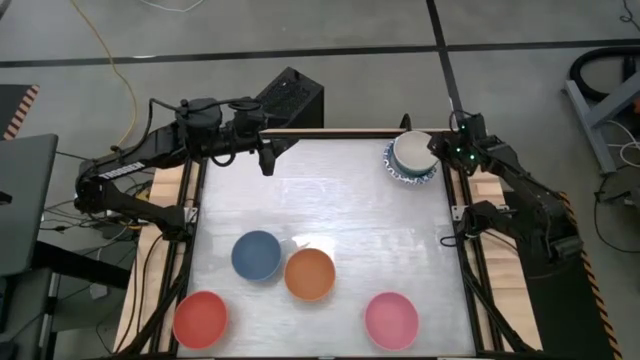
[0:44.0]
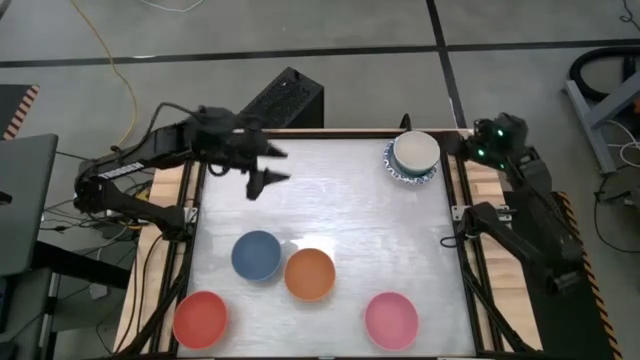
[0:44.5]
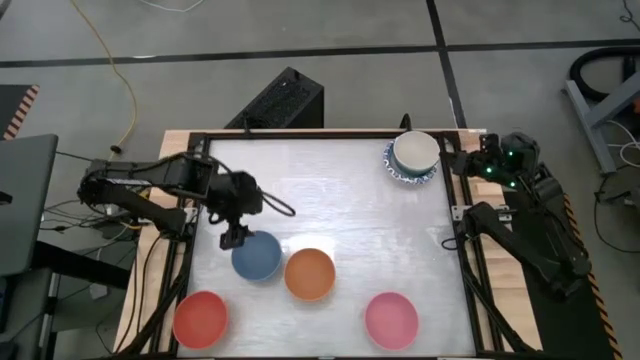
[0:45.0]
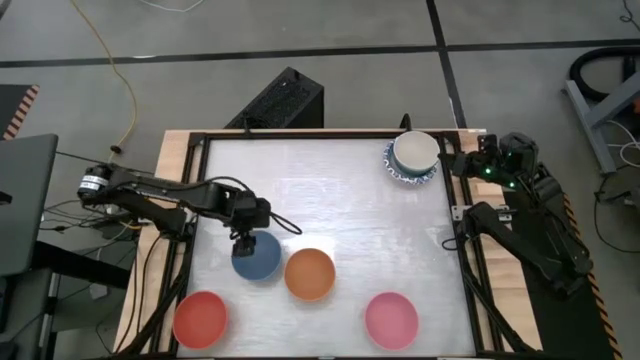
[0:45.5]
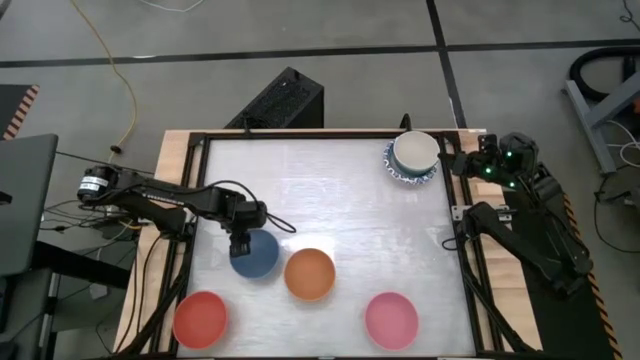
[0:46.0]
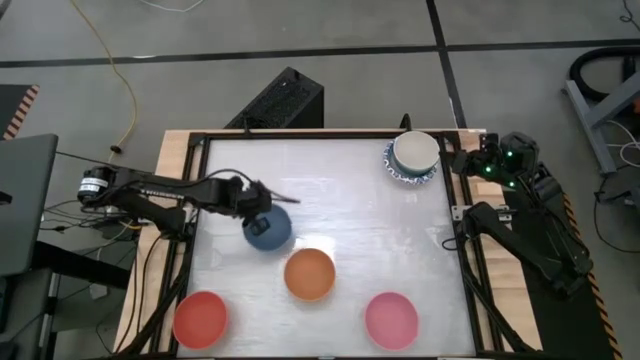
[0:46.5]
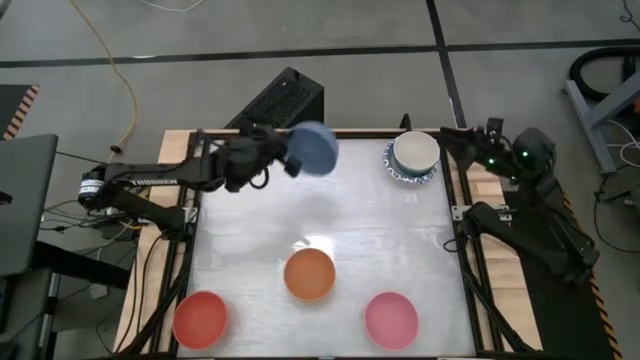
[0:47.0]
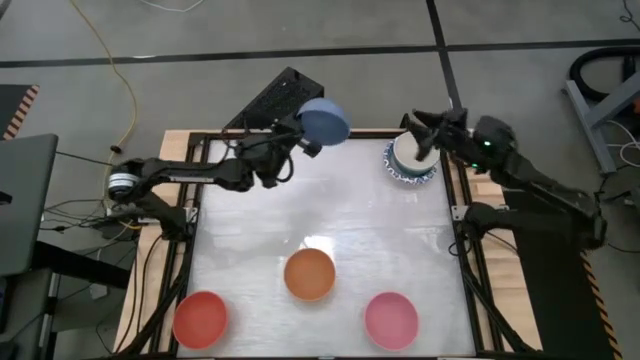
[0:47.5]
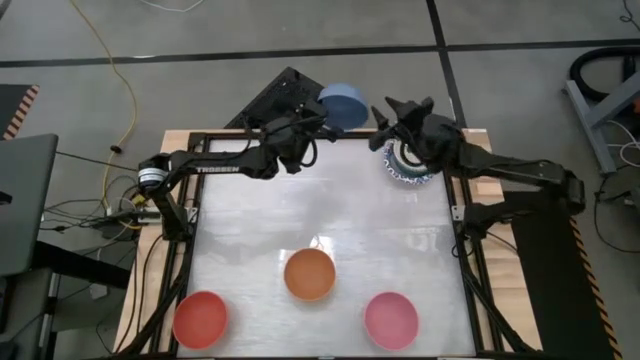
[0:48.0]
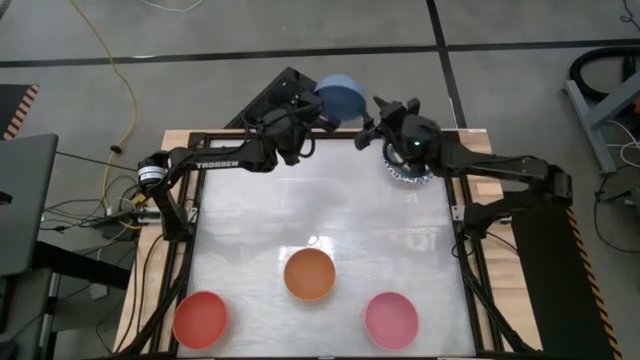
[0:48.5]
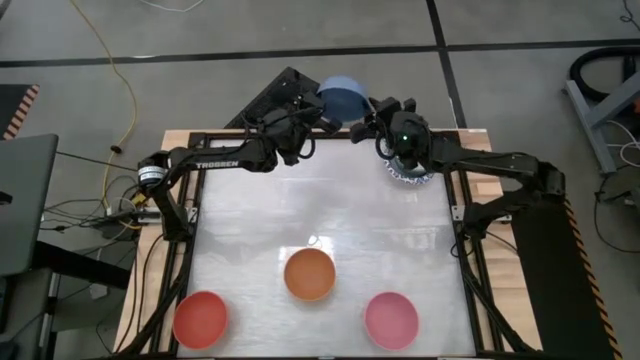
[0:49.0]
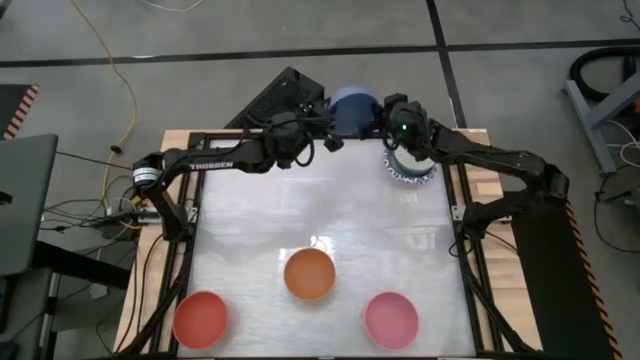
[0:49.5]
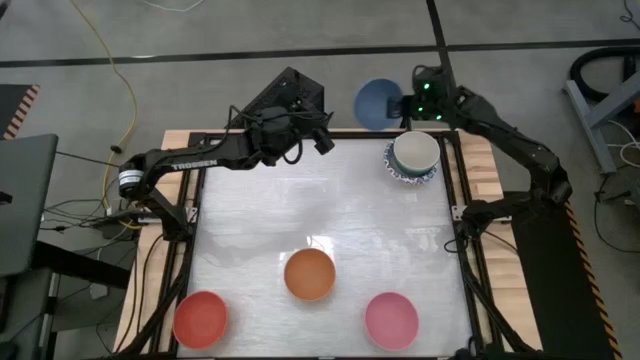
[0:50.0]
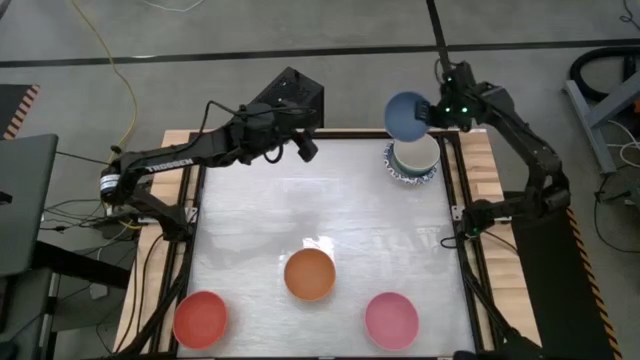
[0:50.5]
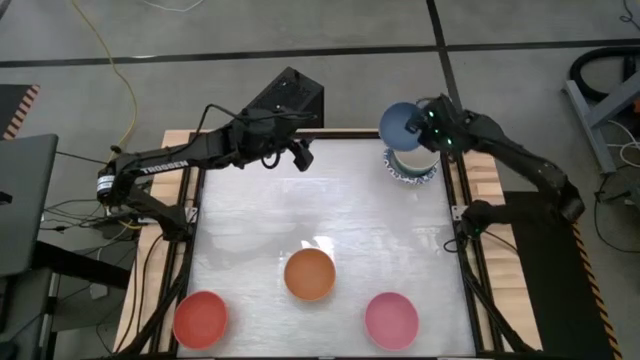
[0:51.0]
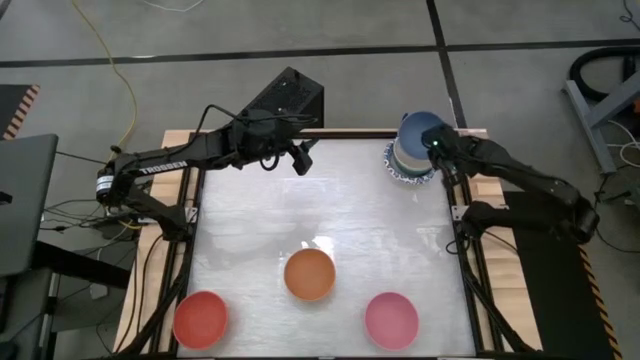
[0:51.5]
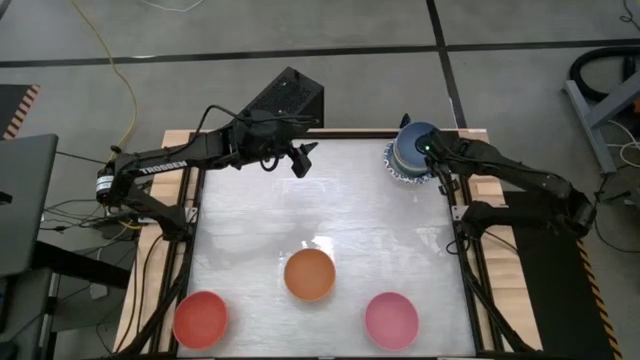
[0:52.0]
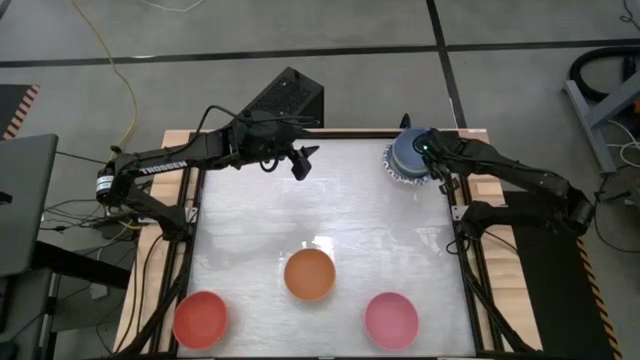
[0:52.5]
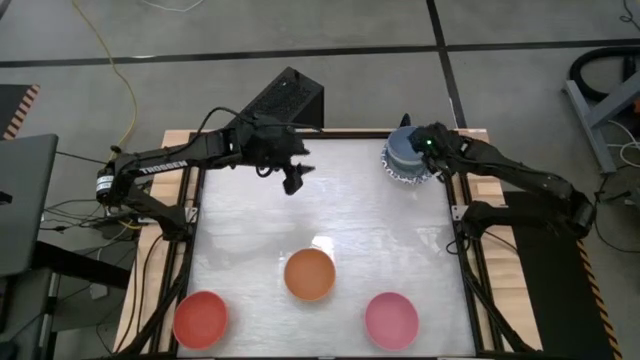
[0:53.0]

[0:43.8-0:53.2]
Stack the blue bowl into the white bowl

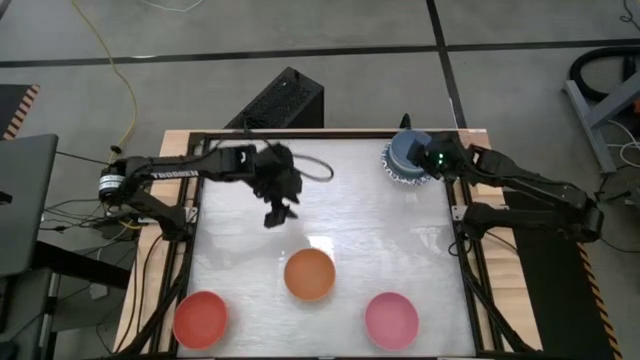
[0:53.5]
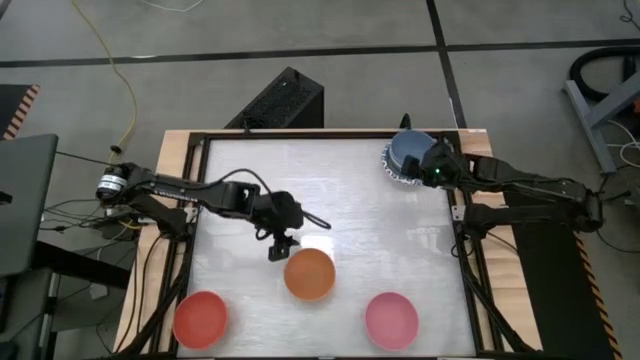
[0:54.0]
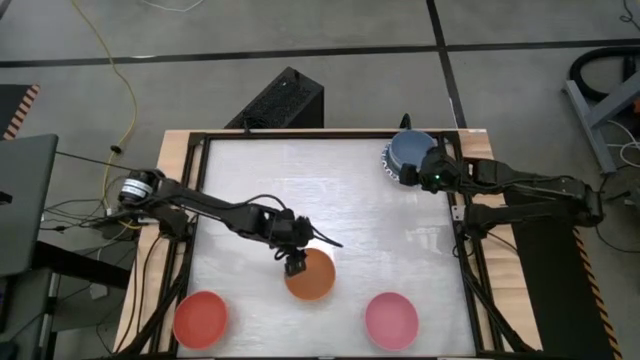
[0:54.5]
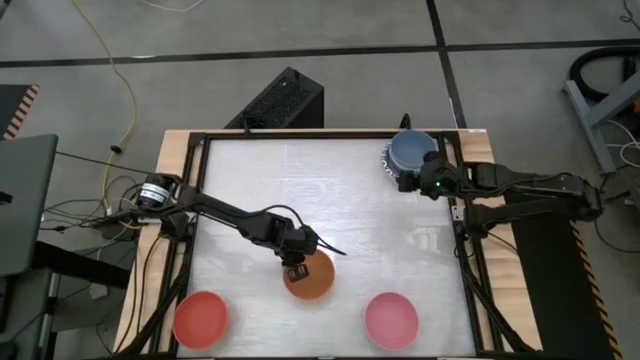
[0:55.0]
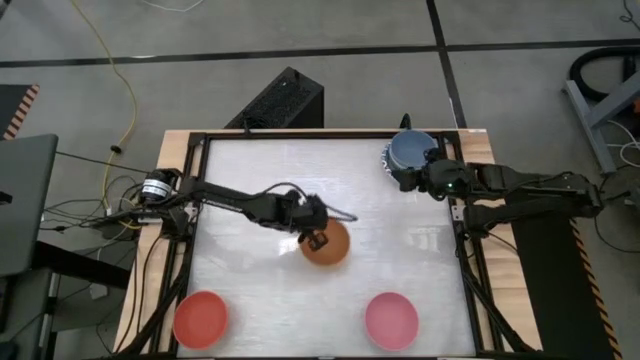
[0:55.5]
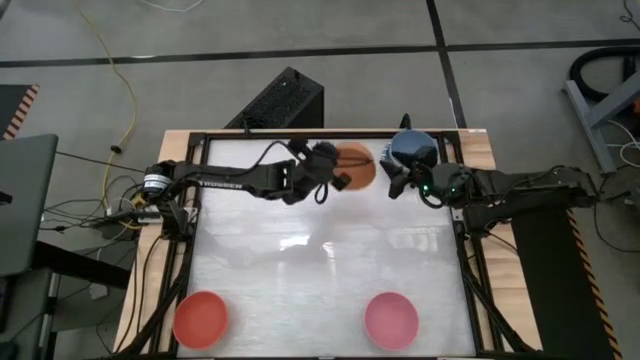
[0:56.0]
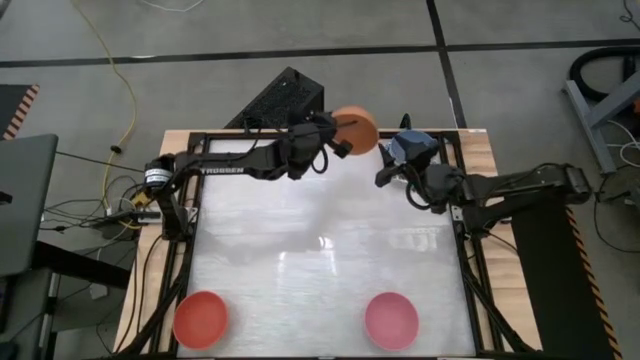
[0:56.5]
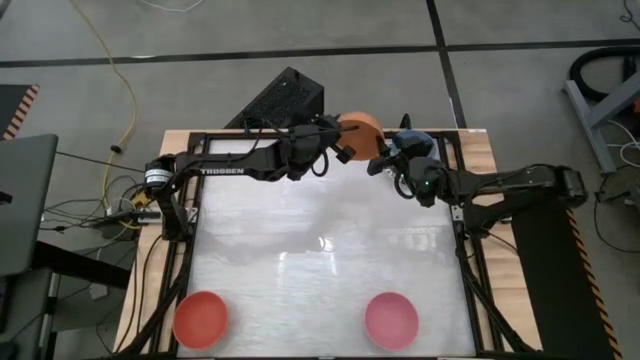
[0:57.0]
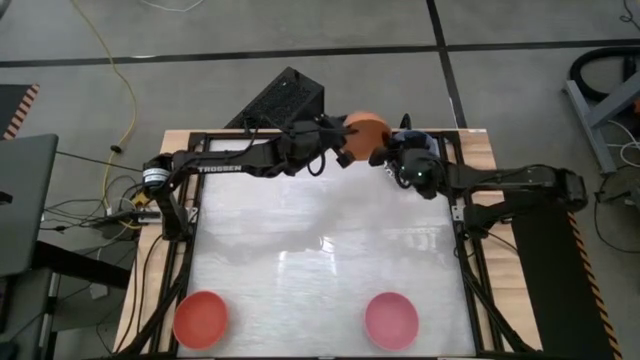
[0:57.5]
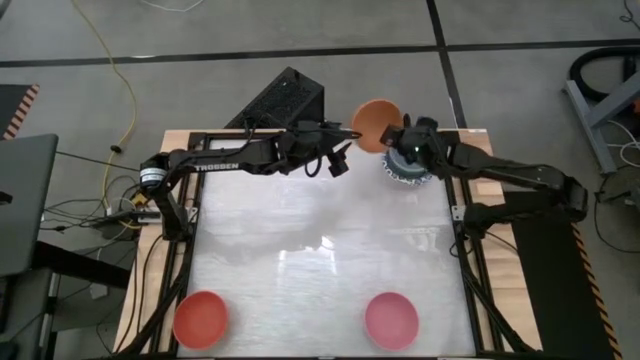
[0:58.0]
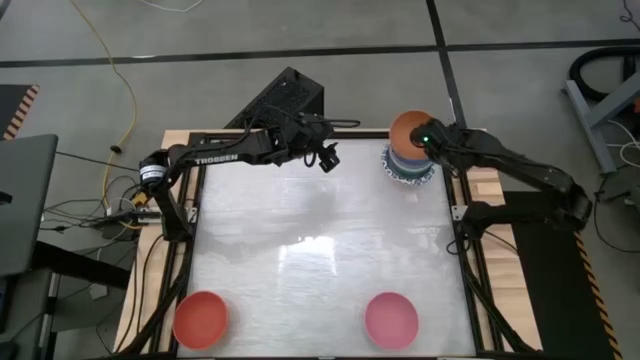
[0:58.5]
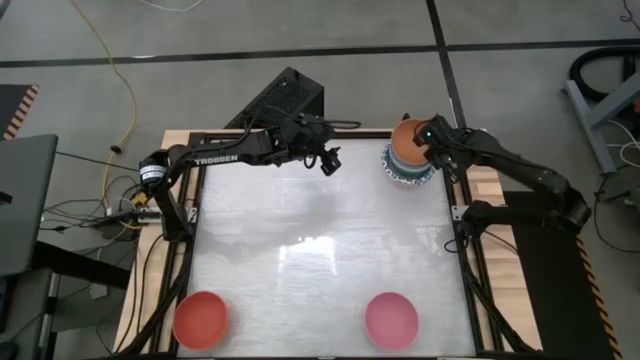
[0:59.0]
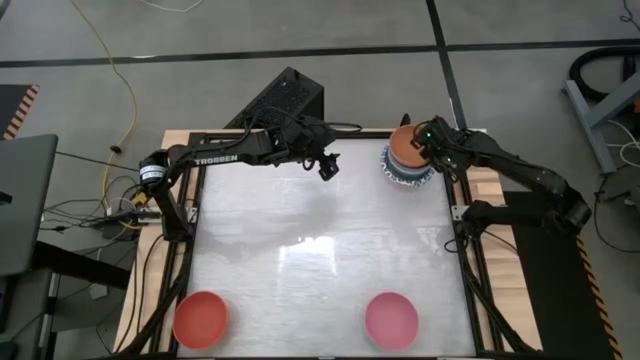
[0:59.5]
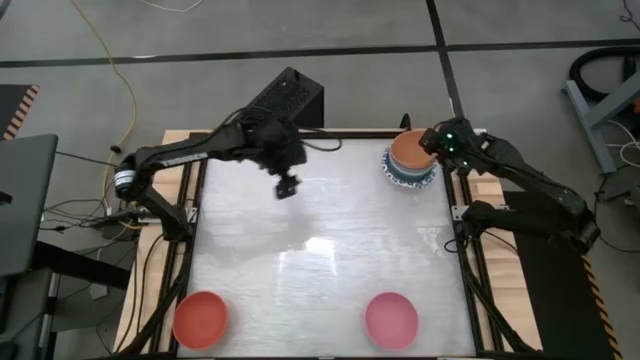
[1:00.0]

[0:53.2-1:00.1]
Stack the light orange bowl into the blue bowl

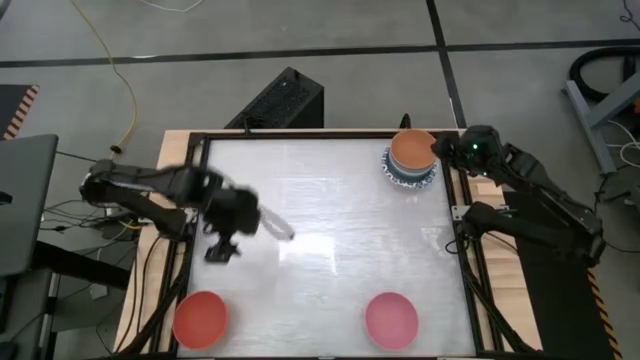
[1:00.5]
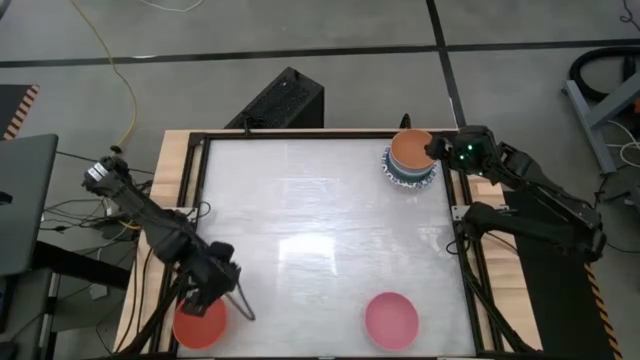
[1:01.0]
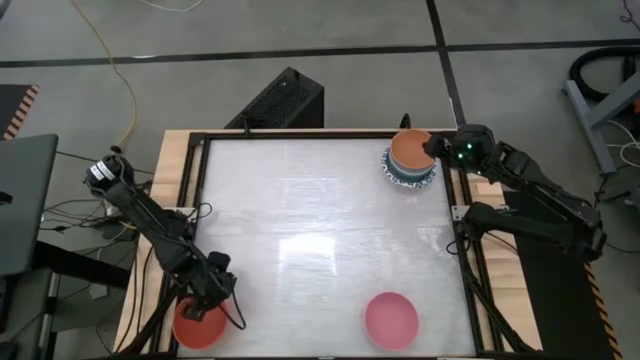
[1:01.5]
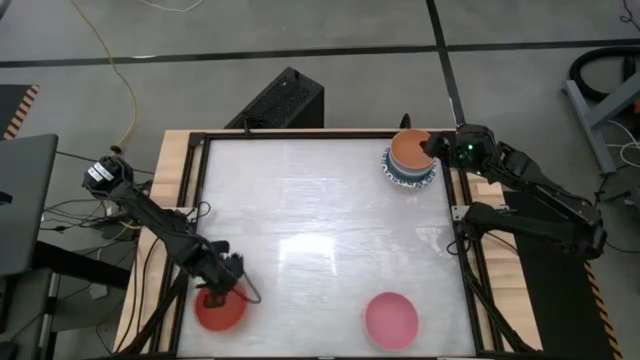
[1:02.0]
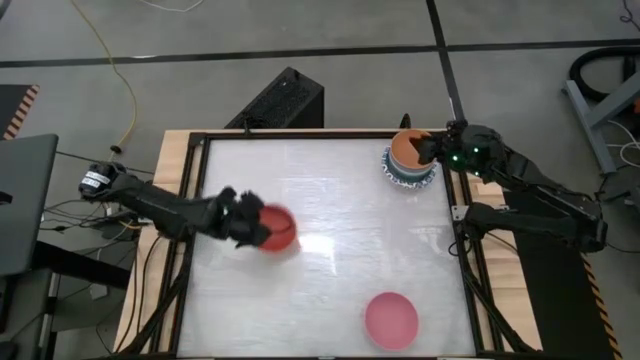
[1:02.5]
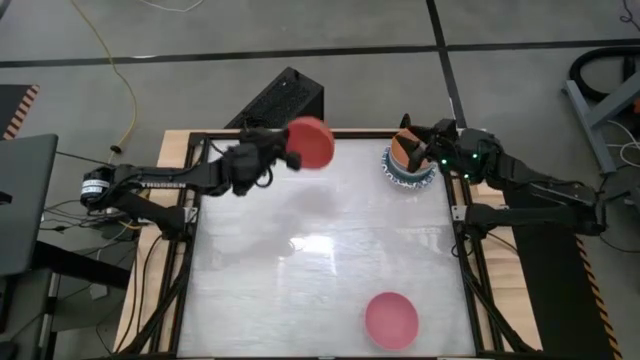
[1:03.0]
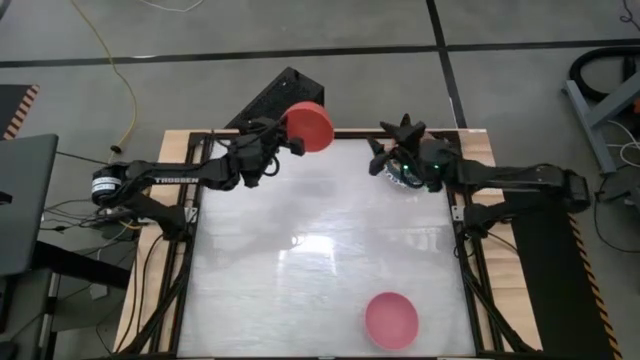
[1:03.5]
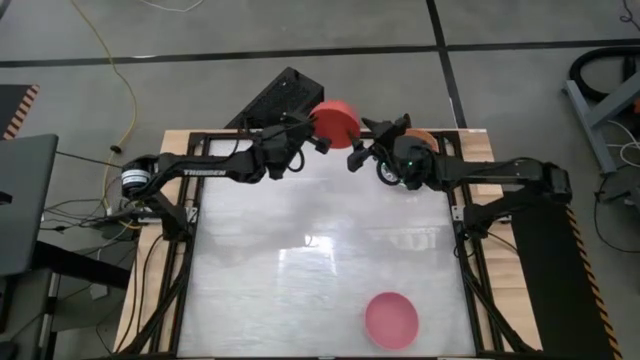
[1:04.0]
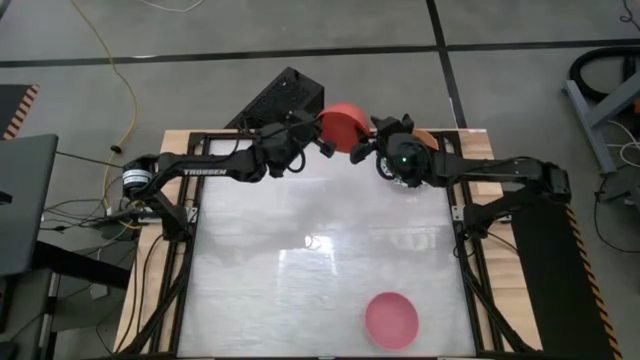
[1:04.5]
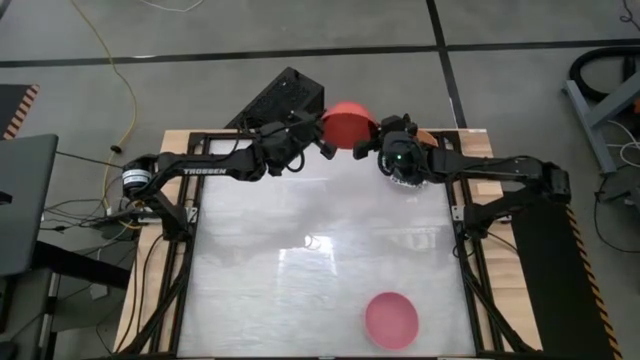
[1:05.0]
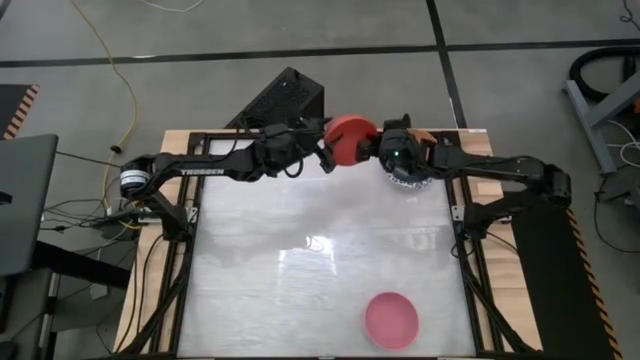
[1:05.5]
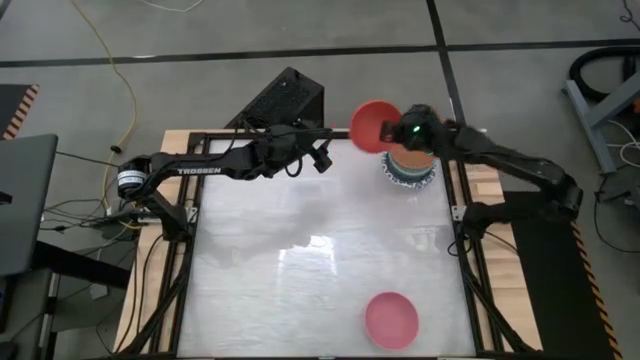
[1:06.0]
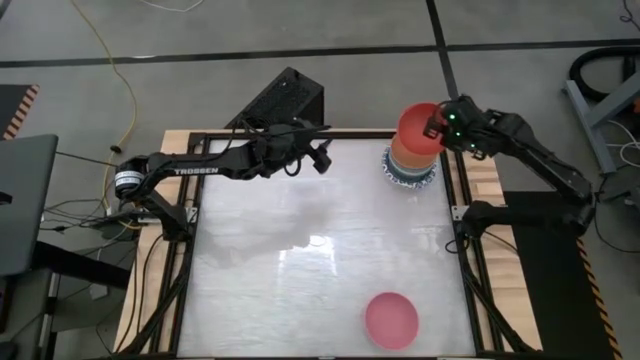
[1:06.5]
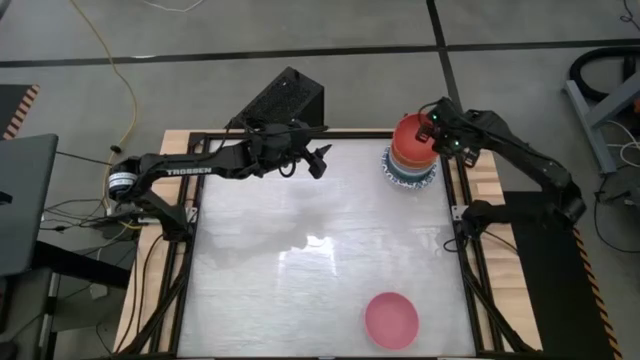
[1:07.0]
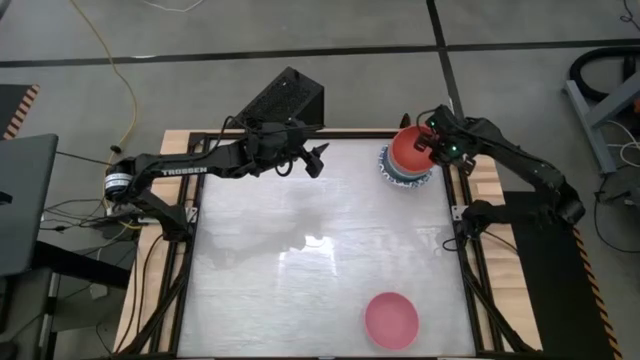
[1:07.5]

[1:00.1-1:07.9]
Stack the orange bowl into the light orange bowl
